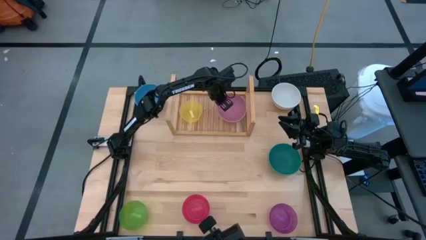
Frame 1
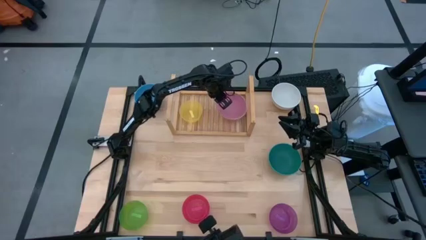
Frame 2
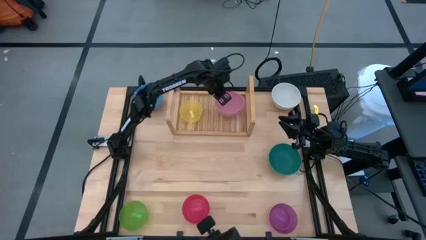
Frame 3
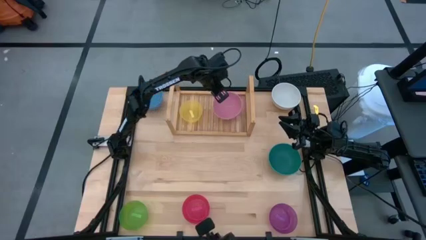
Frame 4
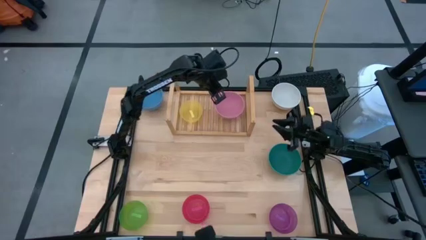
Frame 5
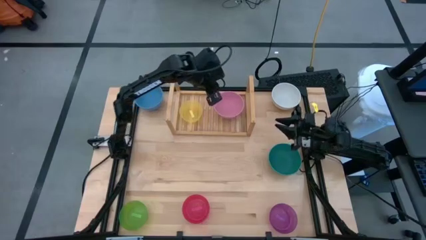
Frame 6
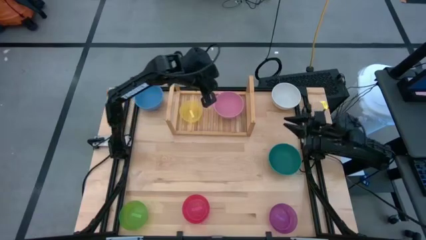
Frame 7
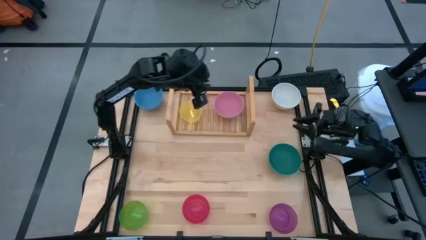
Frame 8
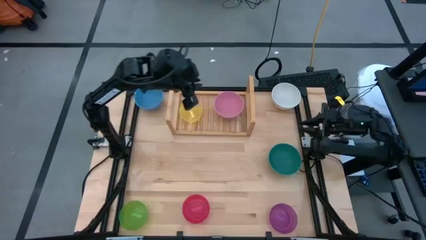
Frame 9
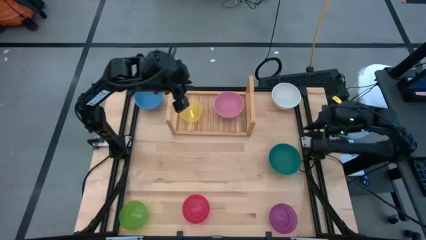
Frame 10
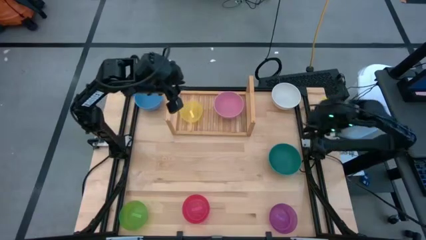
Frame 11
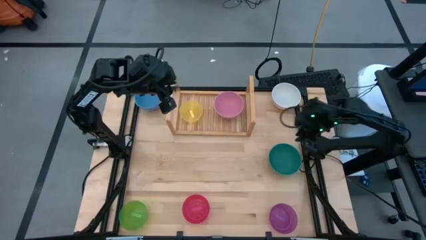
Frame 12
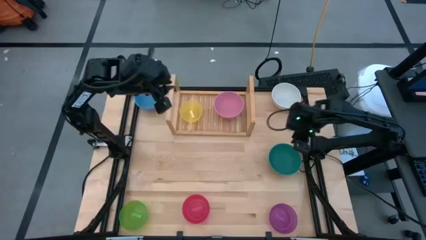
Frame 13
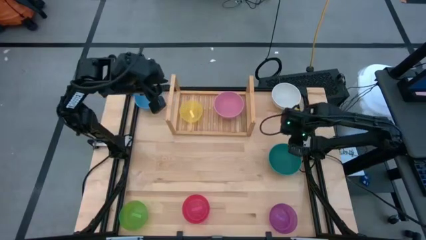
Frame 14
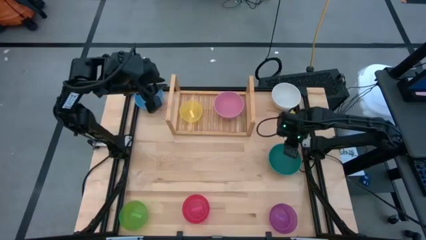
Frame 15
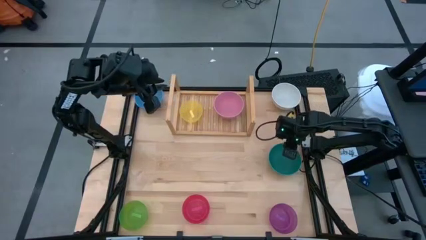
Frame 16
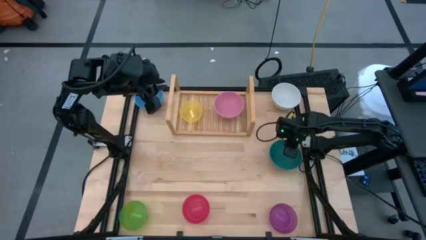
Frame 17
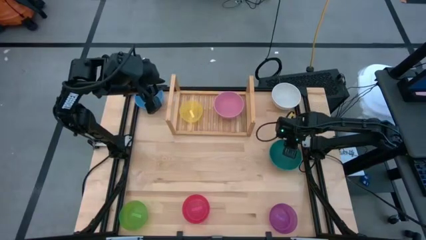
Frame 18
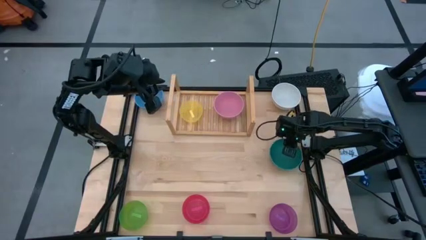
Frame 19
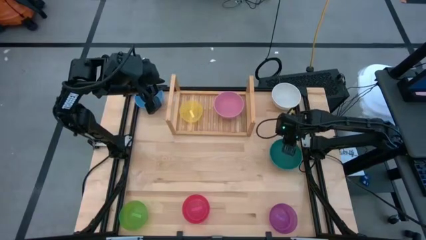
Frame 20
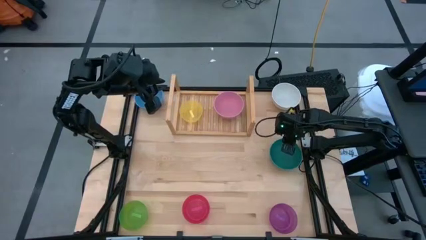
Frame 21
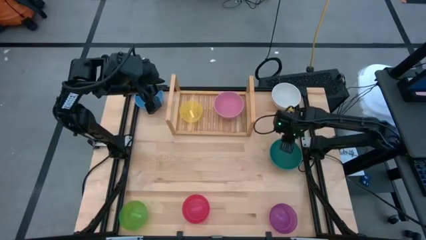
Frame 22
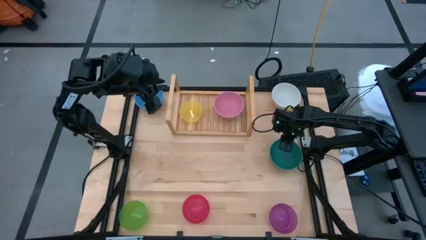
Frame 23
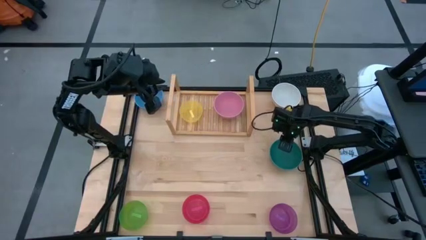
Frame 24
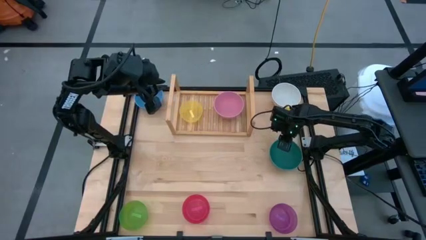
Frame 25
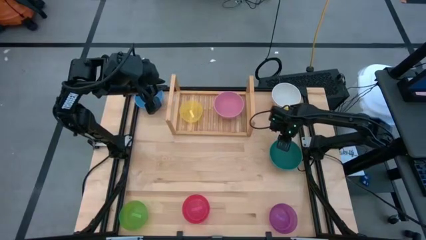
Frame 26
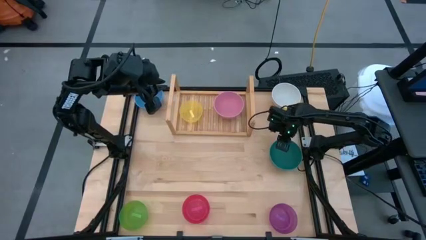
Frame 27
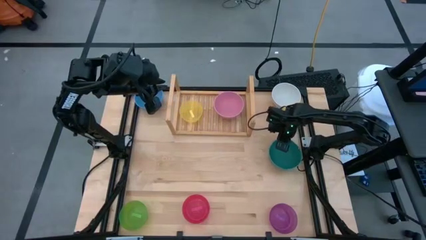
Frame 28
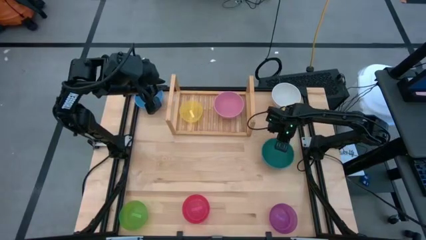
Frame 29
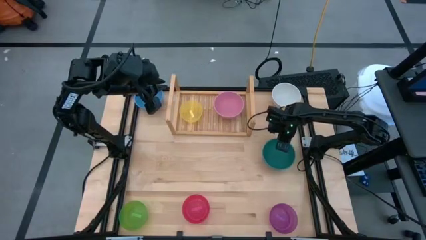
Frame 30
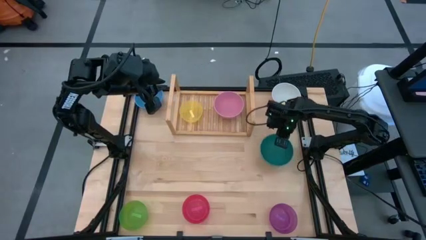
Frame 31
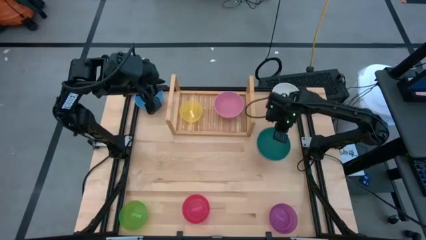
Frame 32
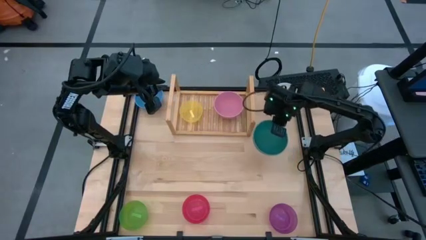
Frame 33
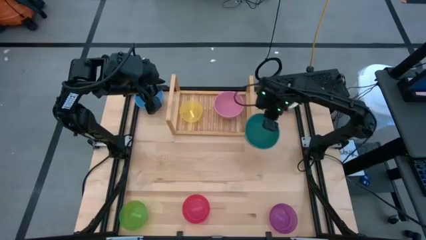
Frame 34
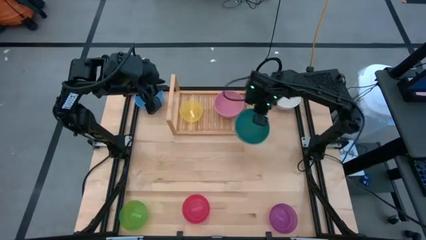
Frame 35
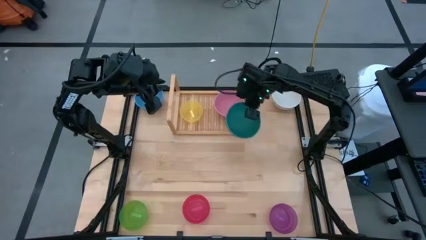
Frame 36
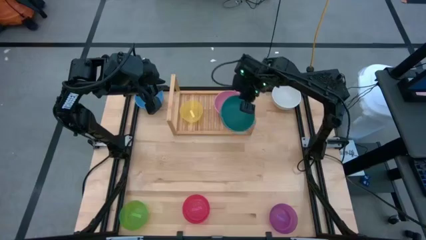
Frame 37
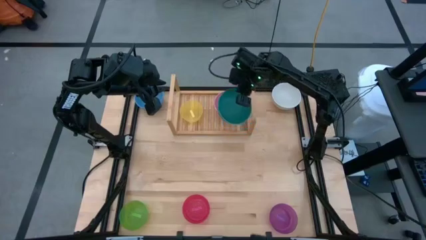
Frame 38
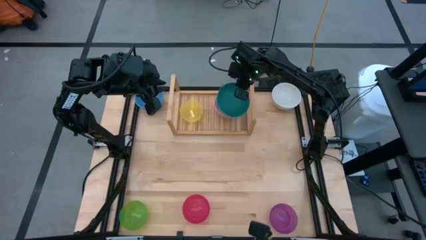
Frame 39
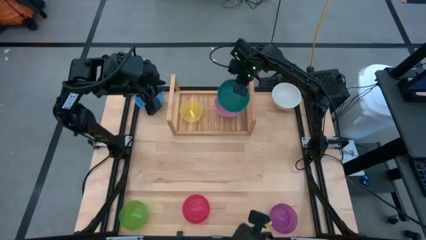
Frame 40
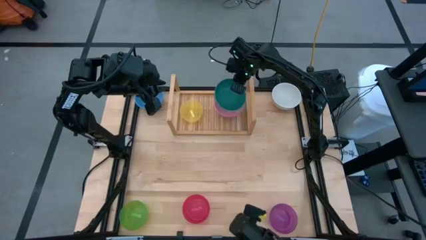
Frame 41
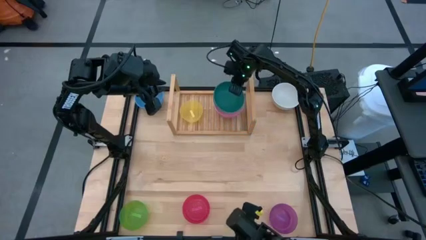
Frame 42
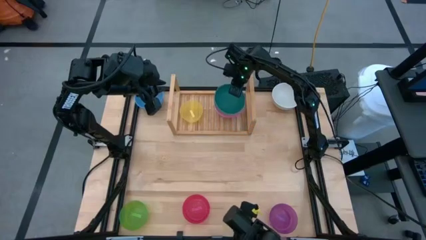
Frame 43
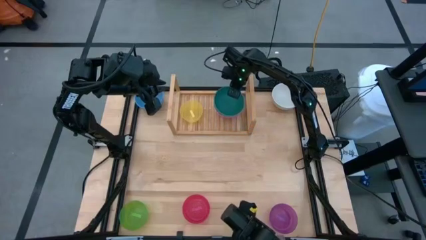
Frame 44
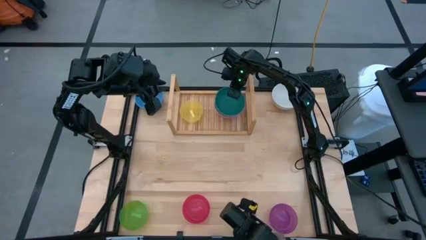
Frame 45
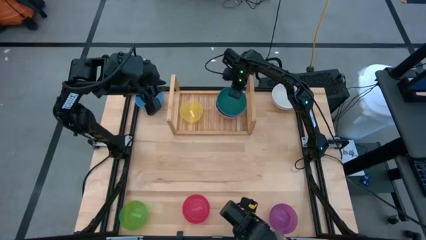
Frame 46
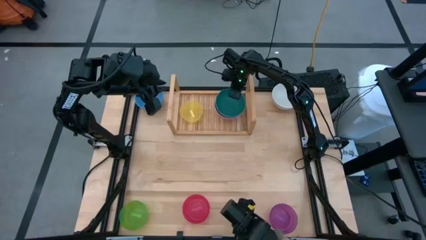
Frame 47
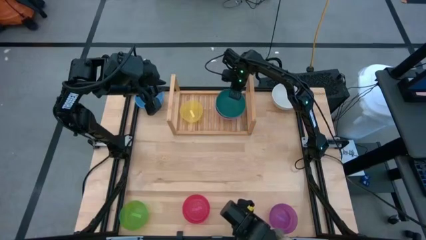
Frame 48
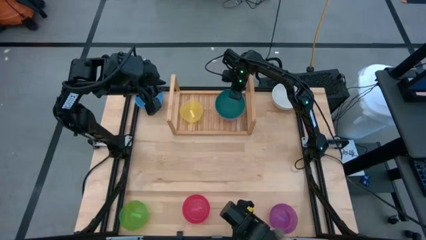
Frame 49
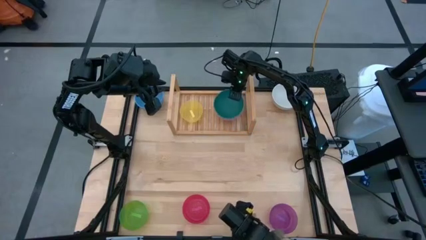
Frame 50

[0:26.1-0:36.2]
Task: Place and stack bowls onto a shelf
Stack the green bowl onto the pink bowl
